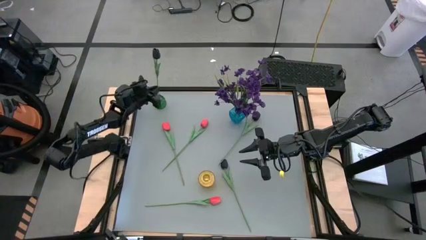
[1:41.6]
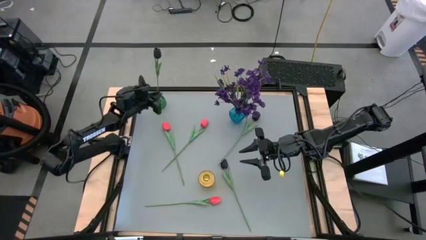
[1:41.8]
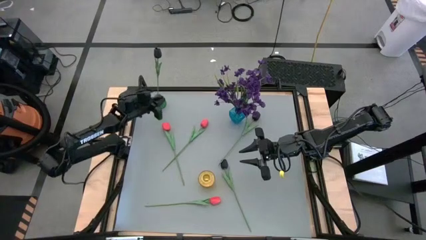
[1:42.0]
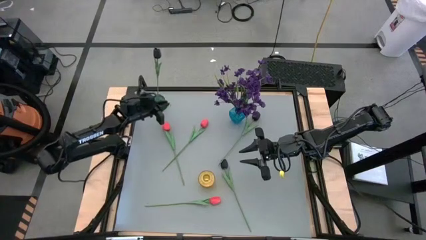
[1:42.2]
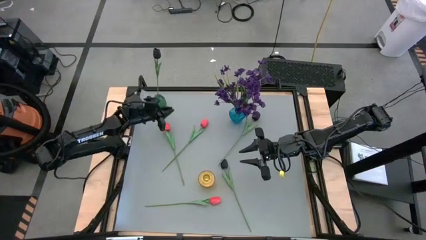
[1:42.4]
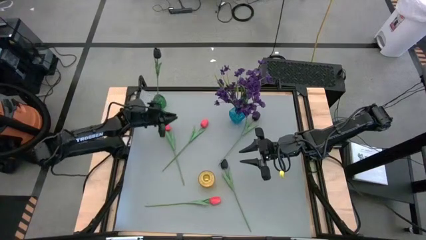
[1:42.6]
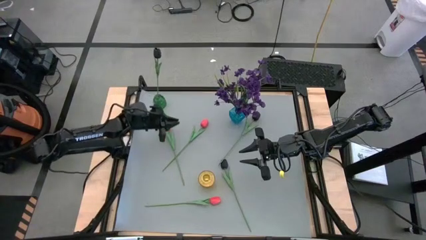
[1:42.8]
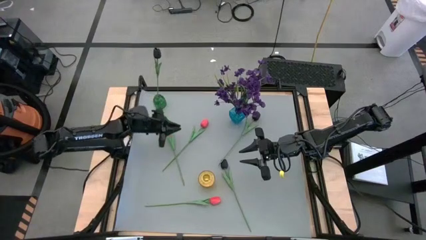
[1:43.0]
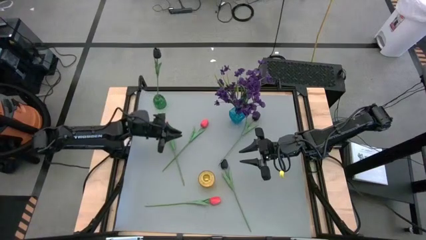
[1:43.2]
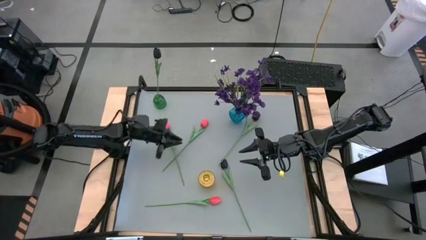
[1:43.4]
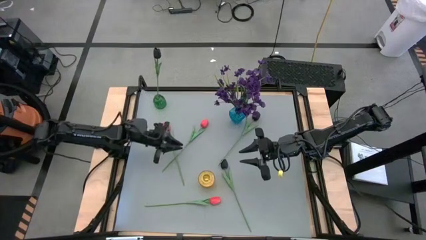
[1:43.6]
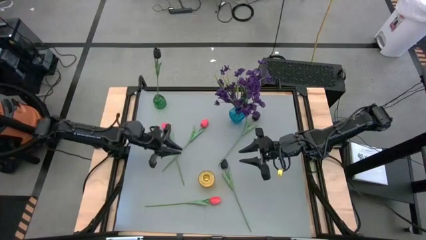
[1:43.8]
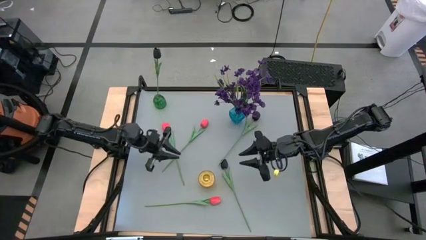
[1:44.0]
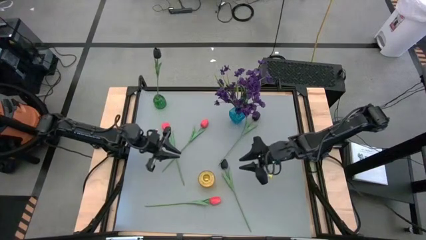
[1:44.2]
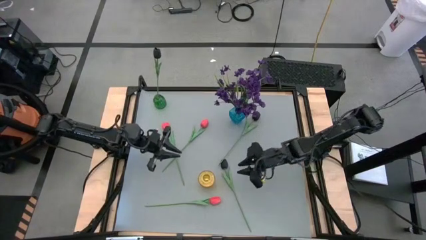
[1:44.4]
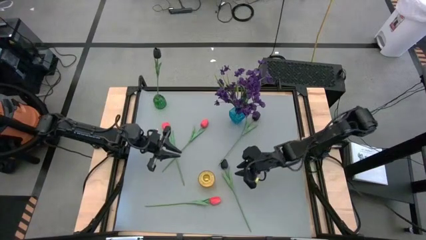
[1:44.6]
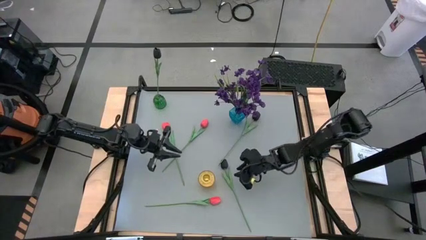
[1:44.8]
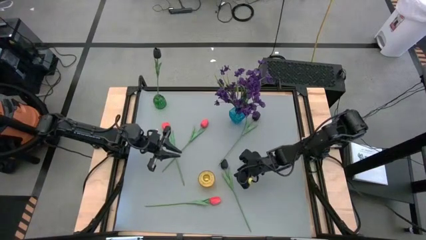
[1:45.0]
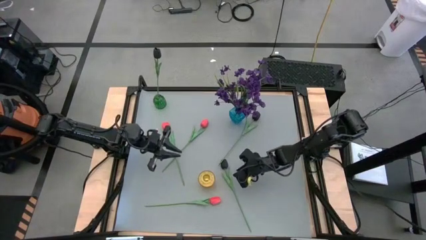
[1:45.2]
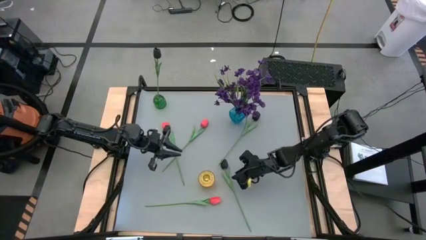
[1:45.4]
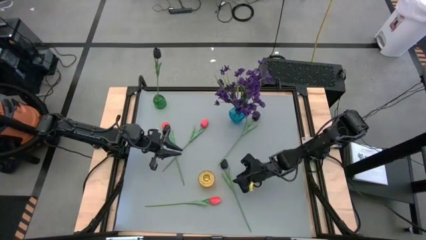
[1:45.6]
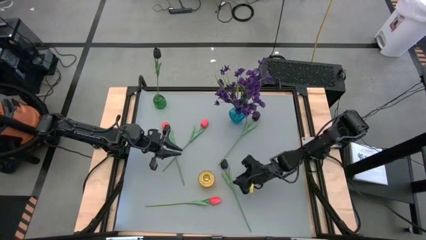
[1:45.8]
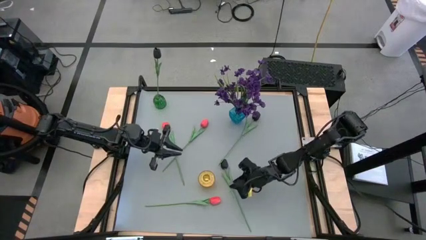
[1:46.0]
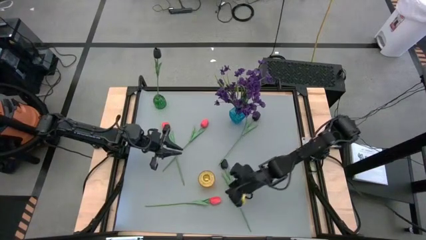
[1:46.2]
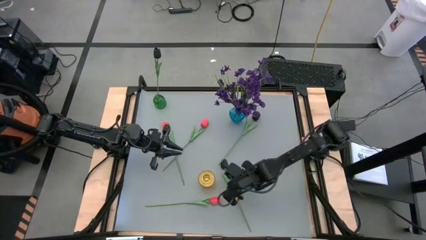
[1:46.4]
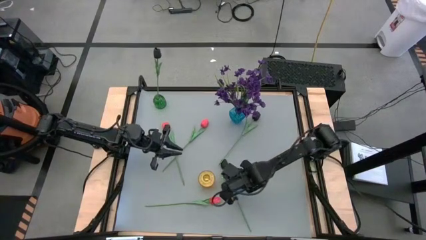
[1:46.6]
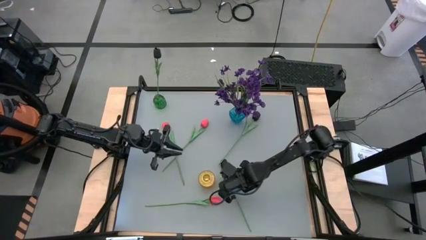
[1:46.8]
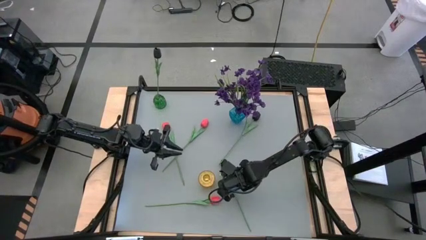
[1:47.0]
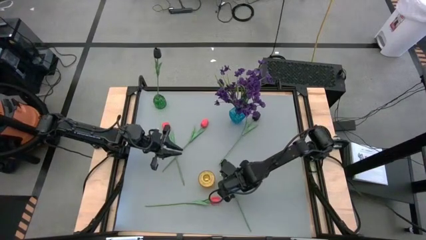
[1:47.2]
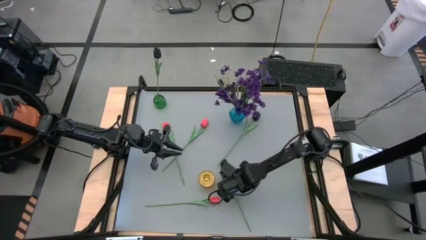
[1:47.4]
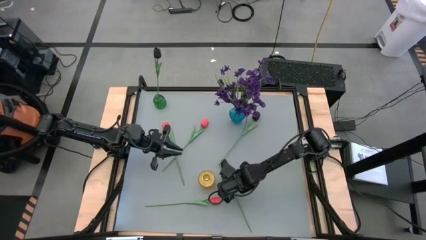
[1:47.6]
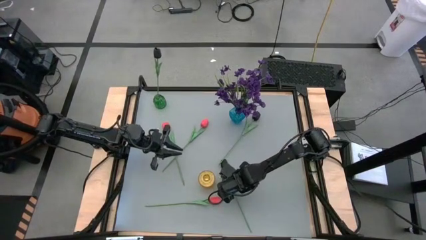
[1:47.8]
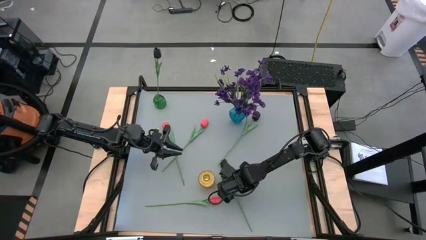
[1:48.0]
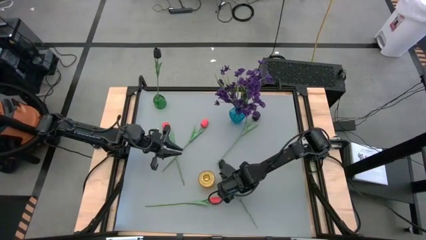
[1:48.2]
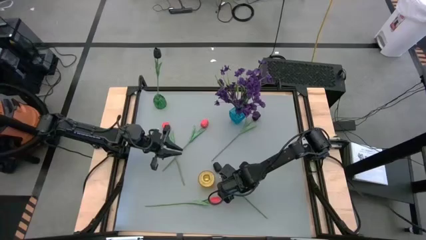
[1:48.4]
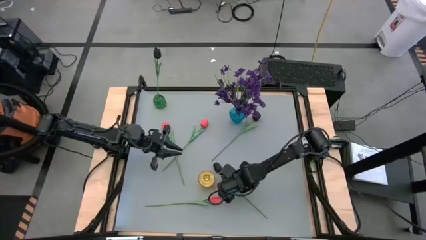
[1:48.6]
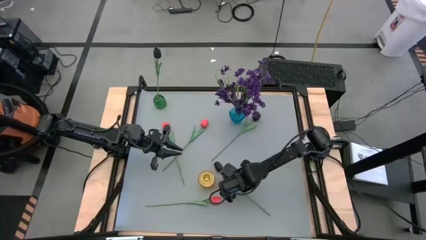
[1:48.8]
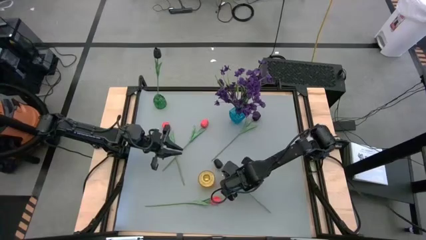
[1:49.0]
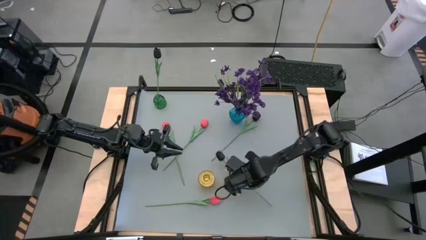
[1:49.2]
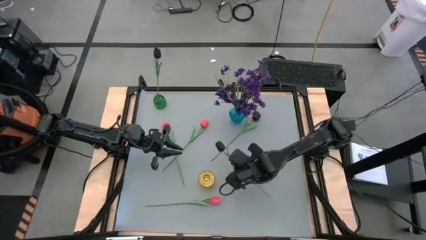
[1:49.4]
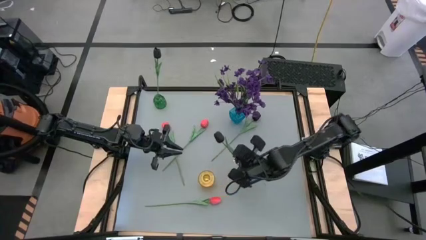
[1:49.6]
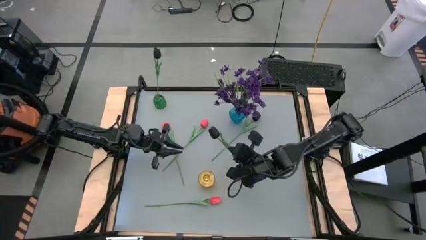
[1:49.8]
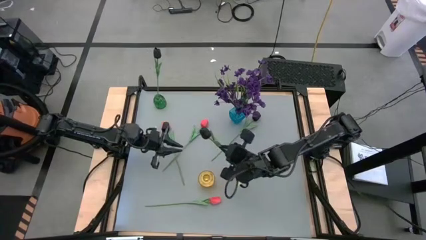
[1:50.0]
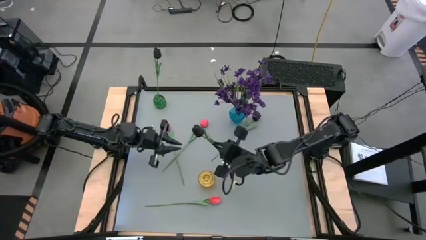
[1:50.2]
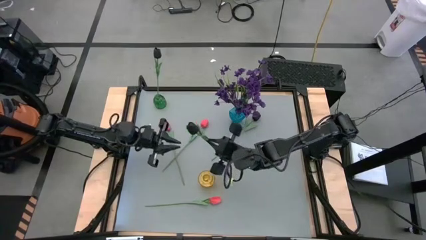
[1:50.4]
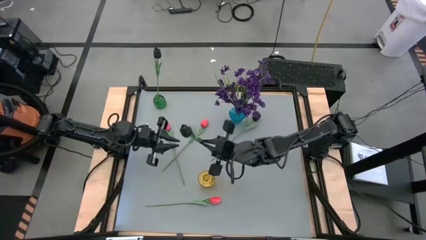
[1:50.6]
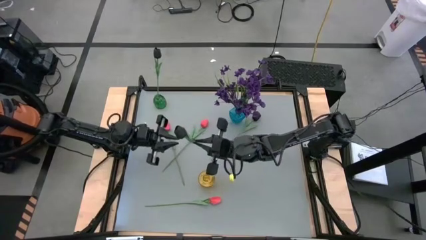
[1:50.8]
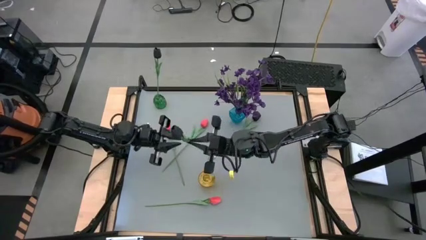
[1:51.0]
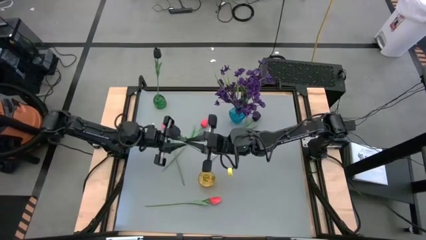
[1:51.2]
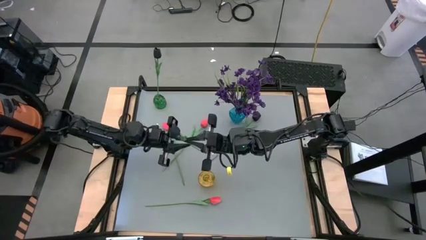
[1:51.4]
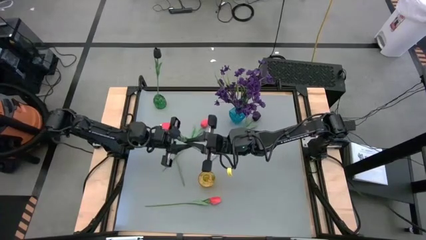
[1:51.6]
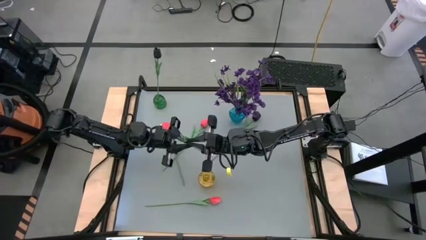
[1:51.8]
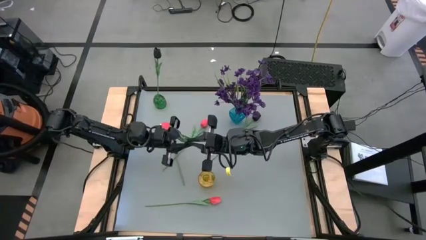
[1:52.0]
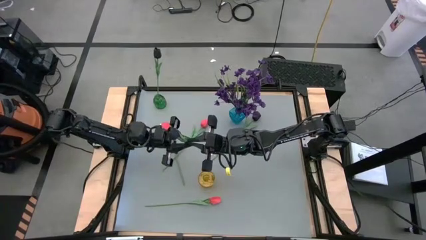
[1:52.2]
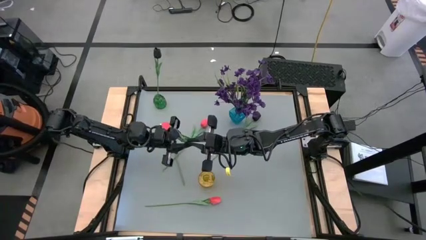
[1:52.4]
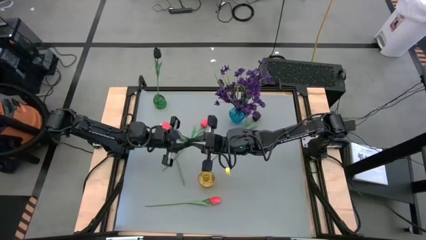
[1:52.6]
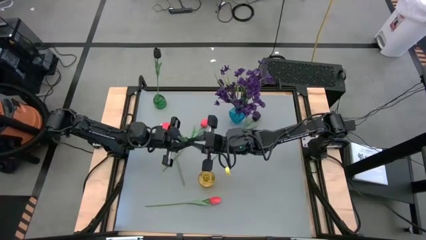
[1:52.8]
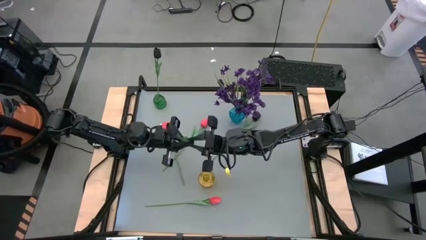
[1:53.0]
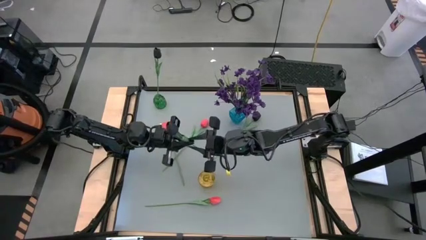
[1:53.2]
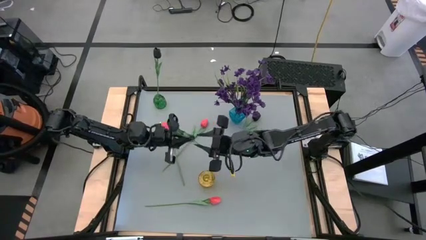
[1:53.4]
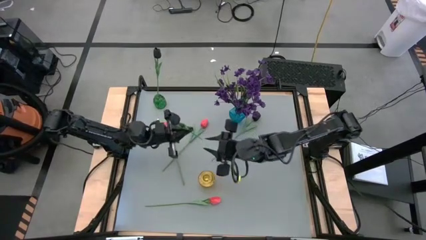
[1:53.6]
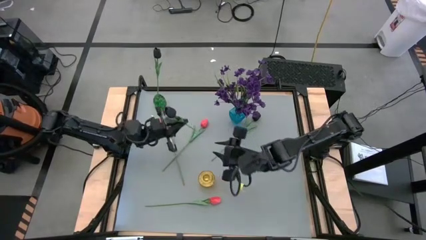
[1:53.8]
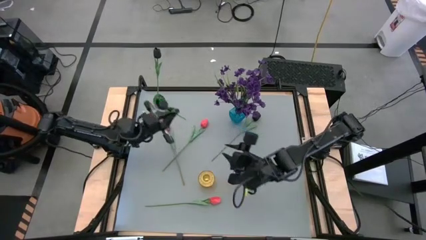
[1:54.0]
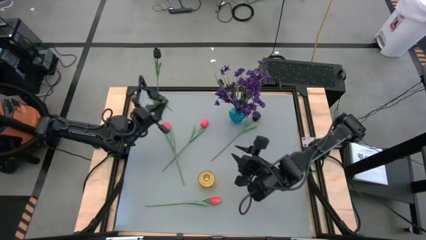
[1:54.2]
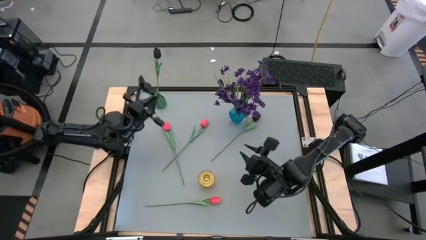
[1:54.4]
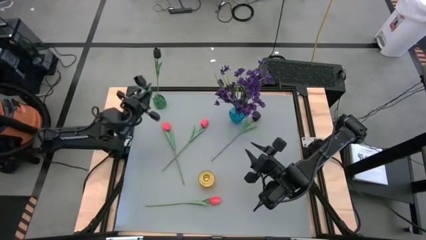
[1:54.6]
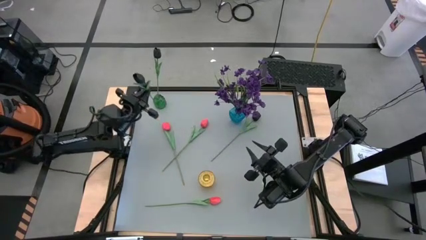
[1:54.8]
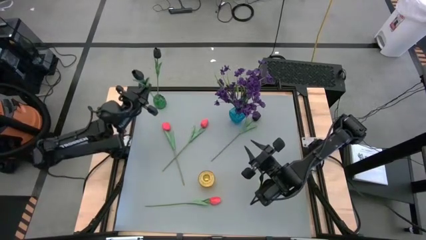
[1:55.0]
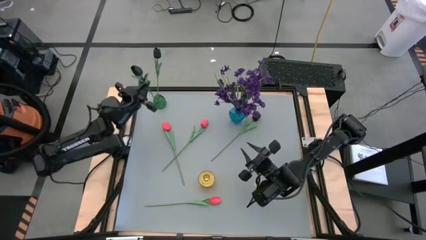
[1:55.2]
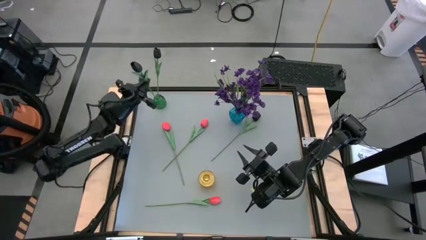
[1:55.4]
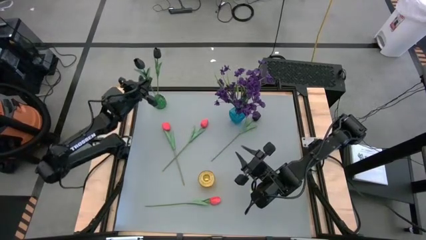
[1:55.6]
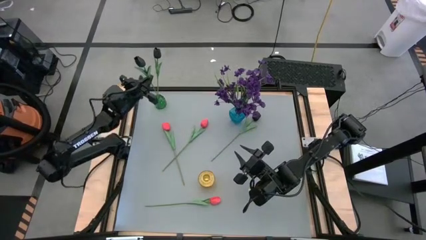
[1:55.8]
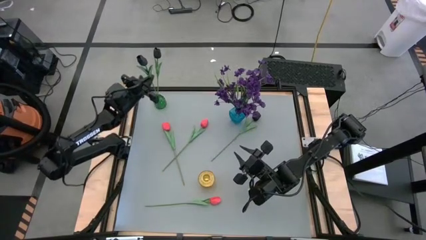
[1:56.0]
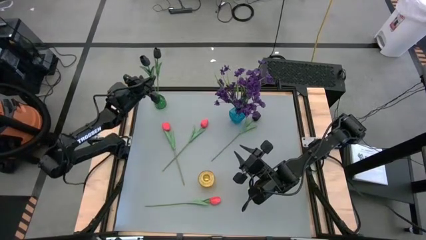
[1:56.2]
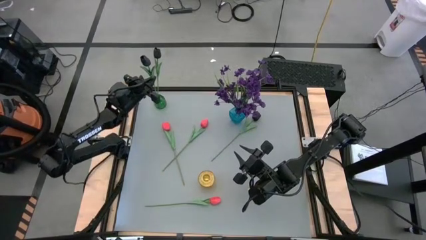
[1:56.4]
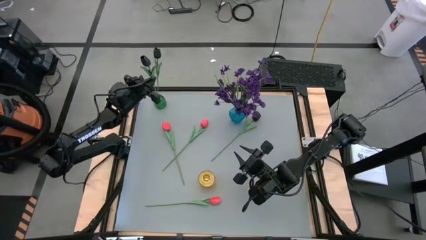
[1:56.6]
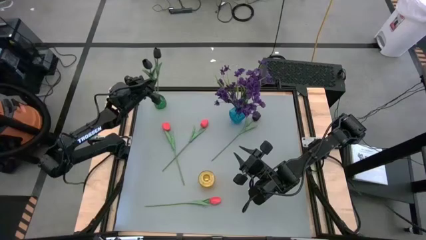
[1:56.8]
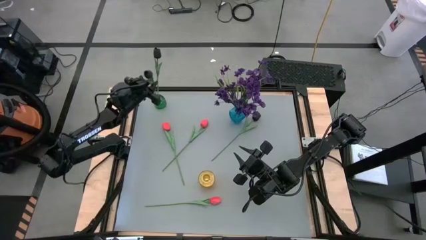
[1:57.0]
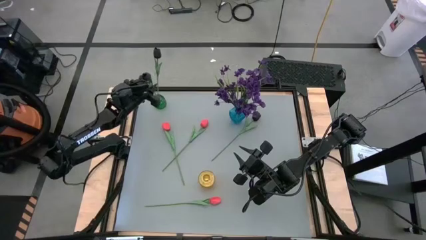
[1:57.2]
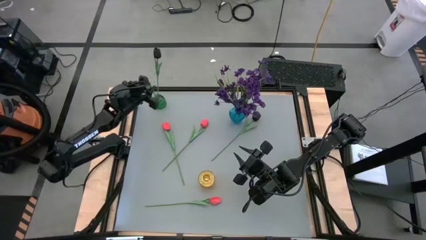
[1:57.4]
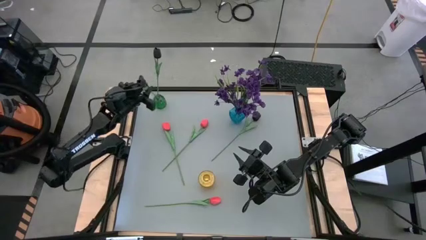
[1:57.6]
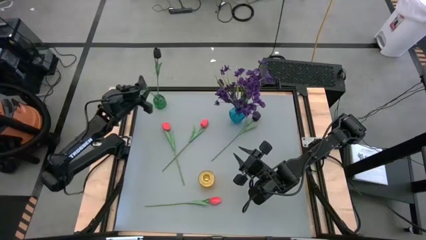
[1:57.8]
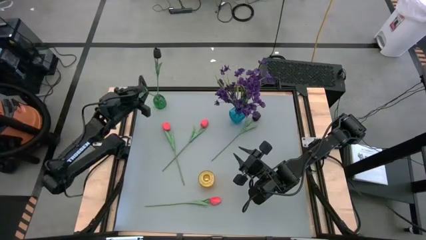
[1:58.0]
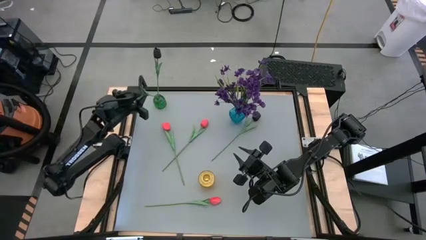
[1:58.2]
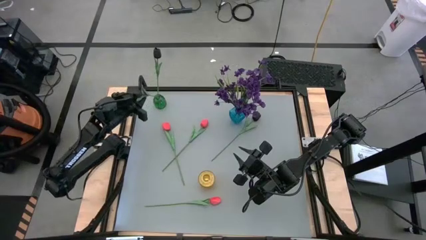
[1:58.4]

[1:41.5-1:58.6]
Task: Sort flowers into vase by color
Put the bottom black flower into the green vase
